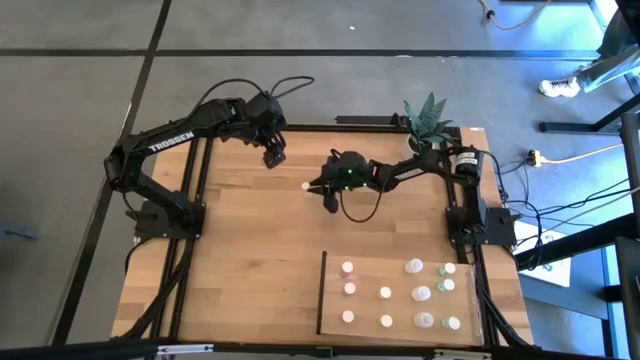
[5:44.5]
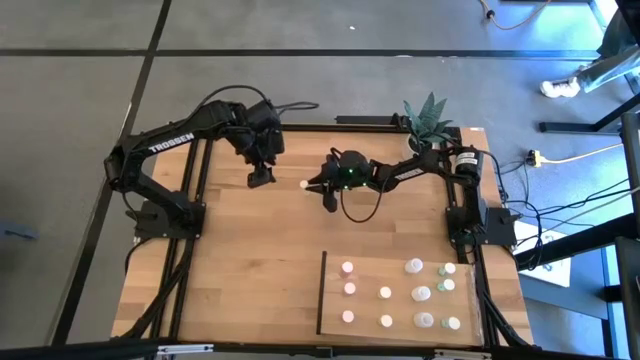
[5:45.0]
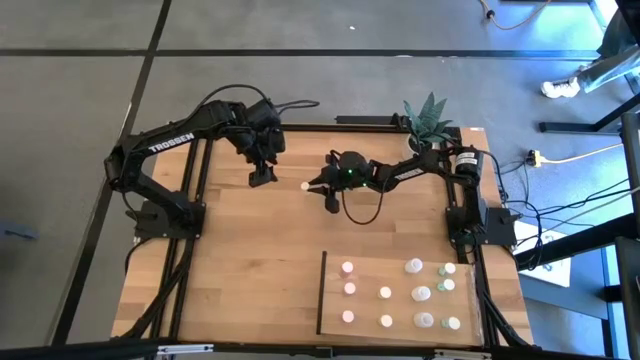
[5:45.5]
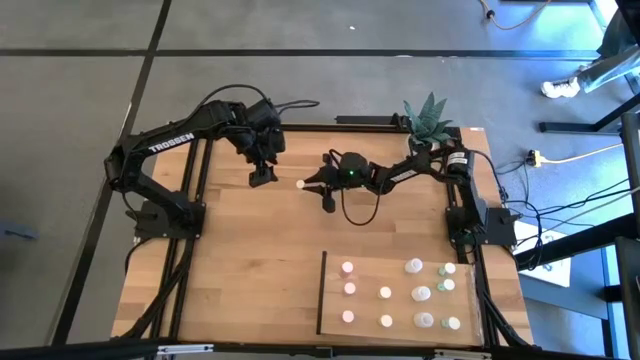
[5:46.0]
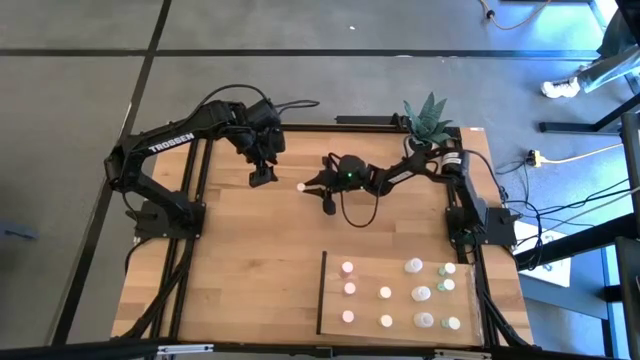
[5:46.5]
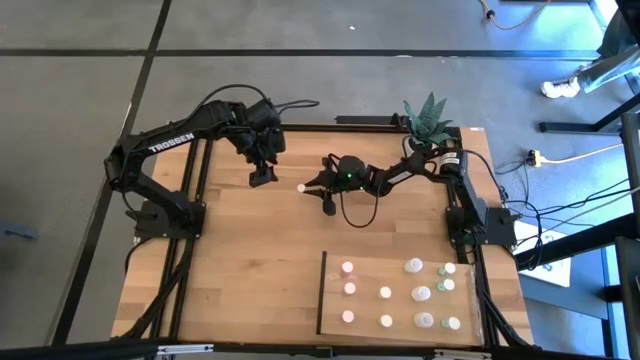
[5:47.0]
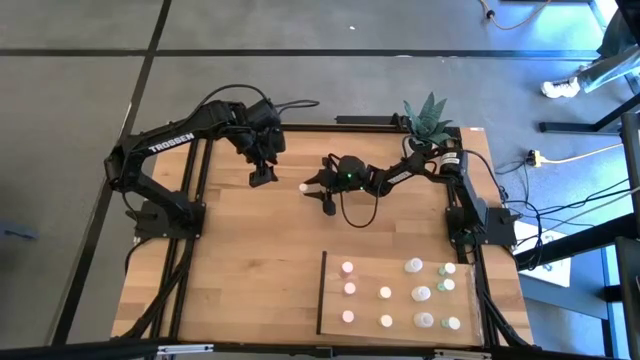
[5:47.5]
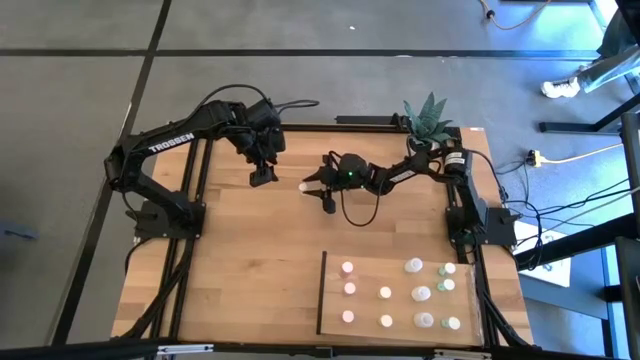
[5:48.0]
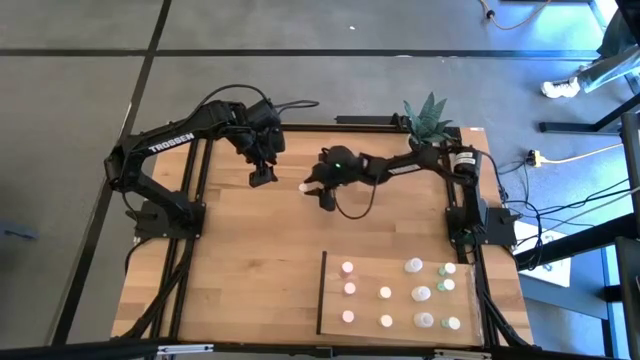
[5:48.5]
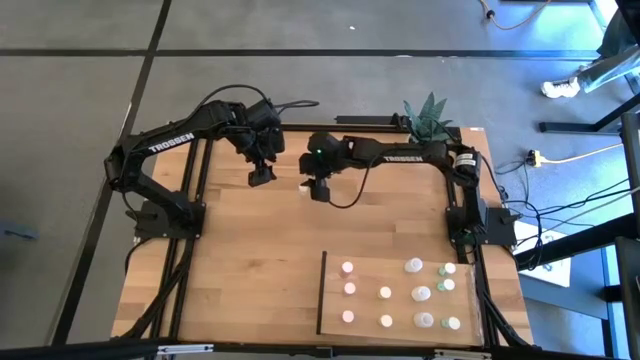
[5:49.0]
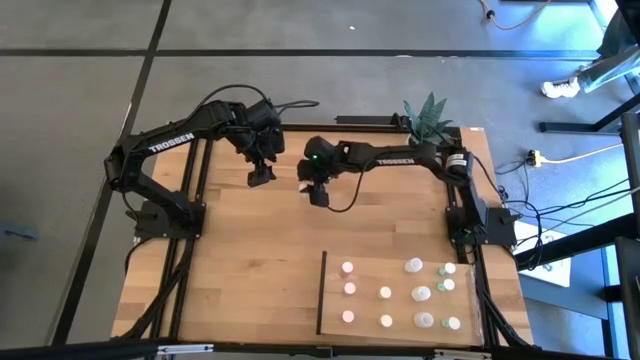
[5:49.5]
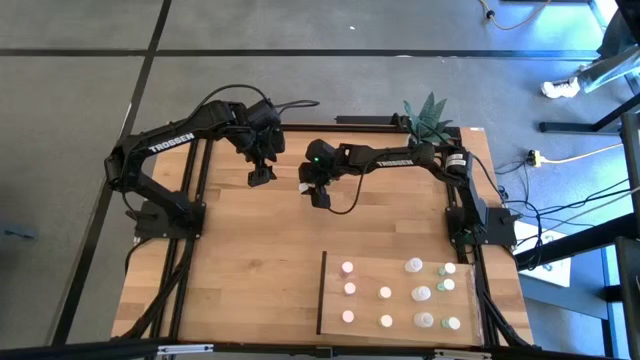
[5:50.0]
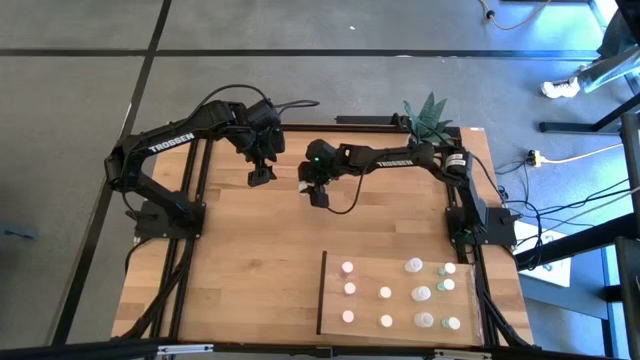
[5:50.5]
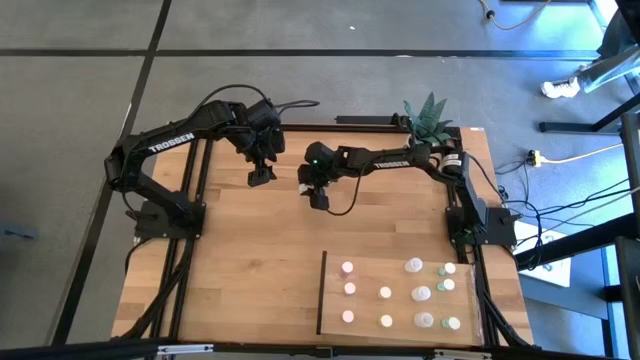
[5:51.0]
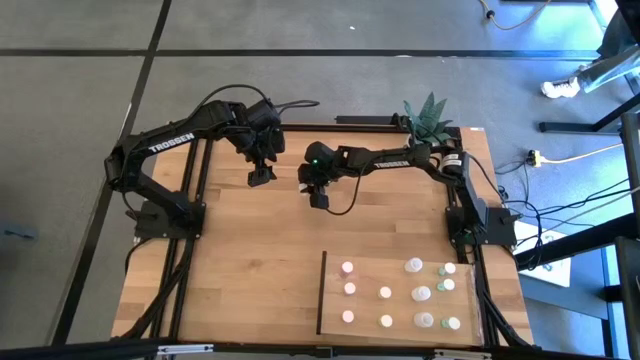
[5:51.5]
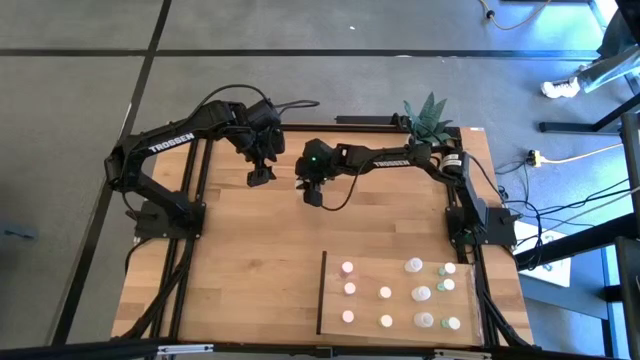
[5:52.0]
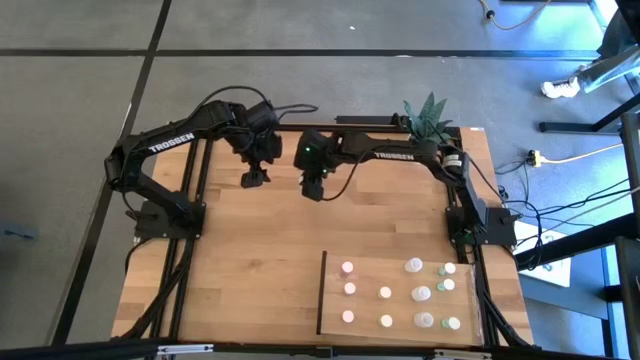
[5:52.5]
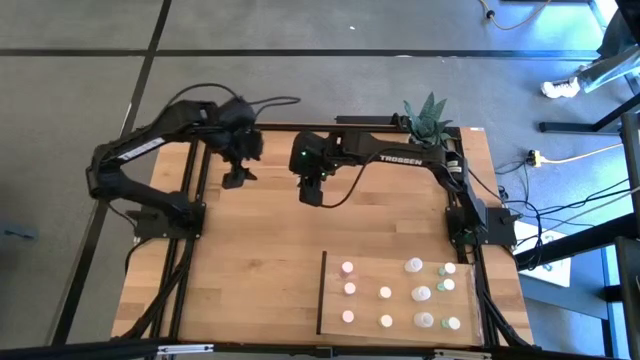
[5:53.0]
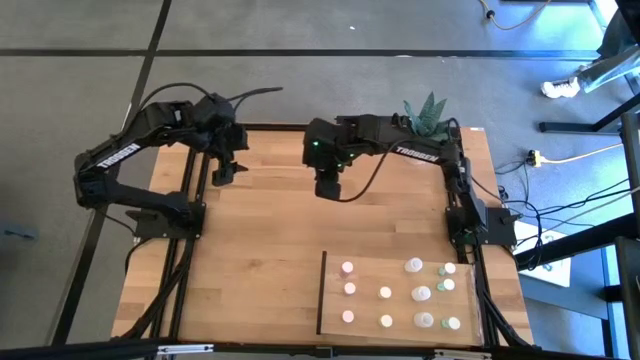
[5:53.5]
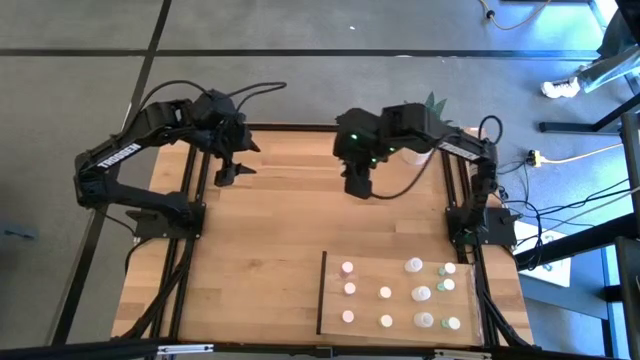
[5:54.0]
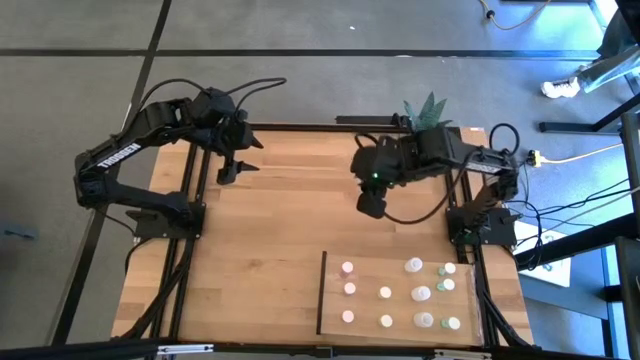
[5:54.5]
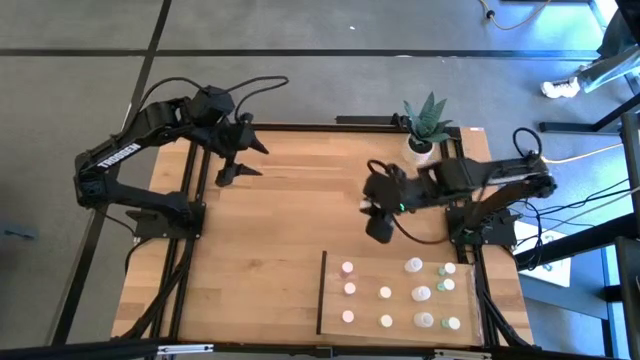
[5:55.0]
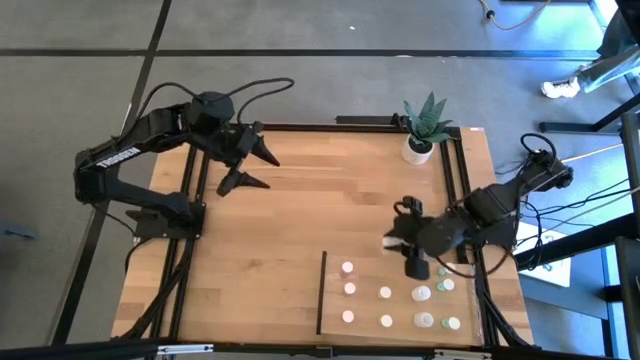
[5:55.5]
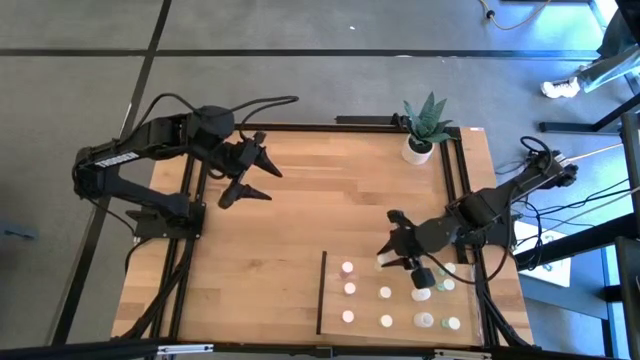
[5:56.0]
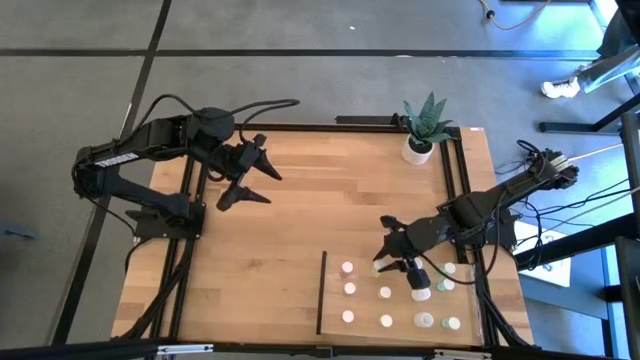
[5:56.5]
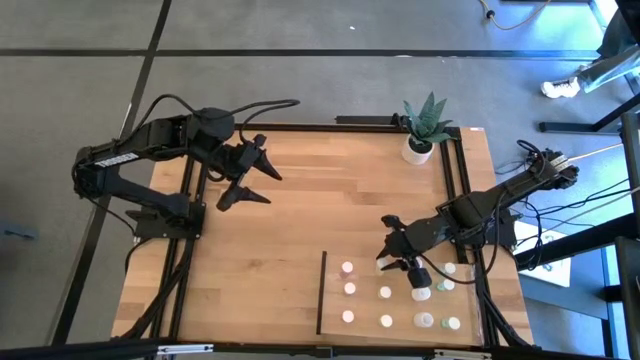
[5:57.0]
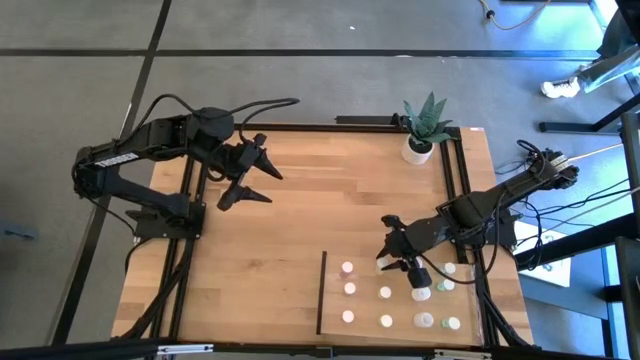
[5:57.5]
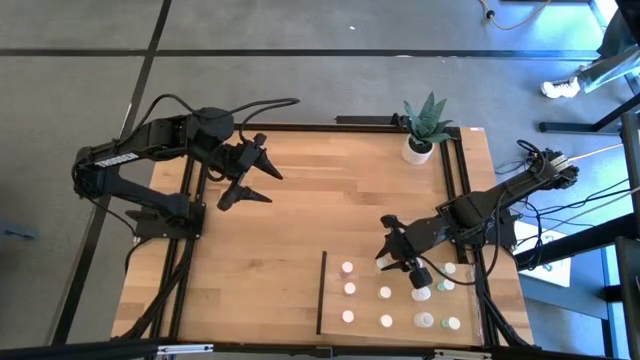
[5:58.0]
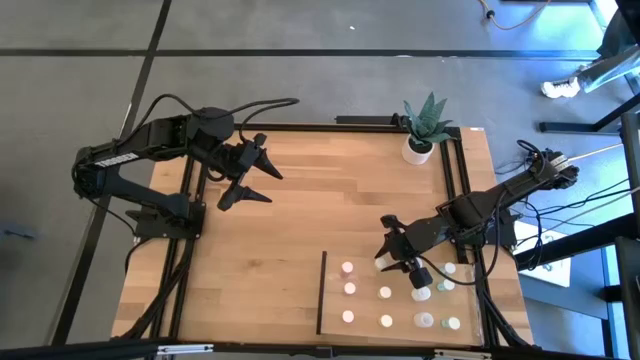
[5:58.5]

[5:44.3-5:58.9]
Task: Pick and place medicine bottles onto shelf by color
Put the yellow pill bottle on the shelf aligned with the other yellow pill bottle

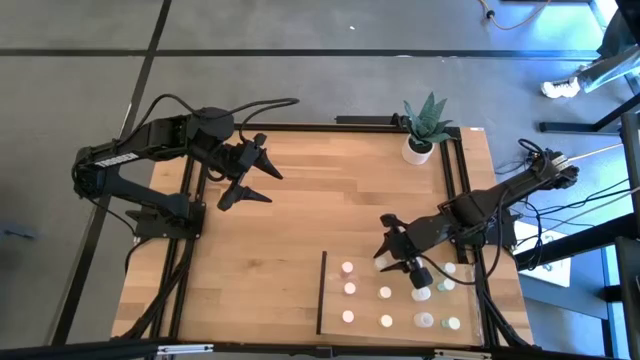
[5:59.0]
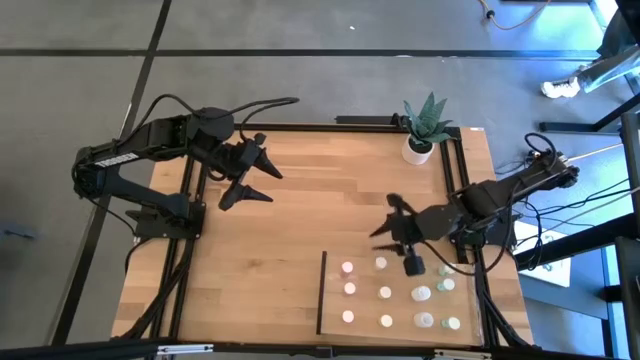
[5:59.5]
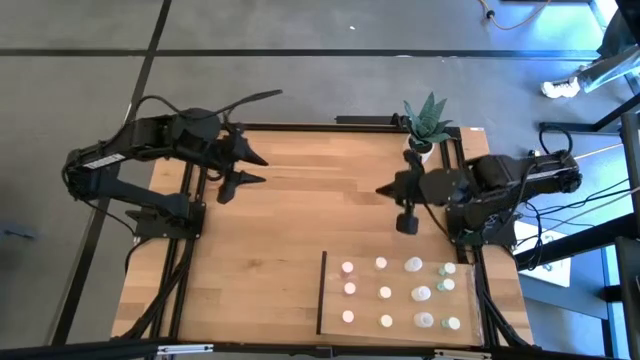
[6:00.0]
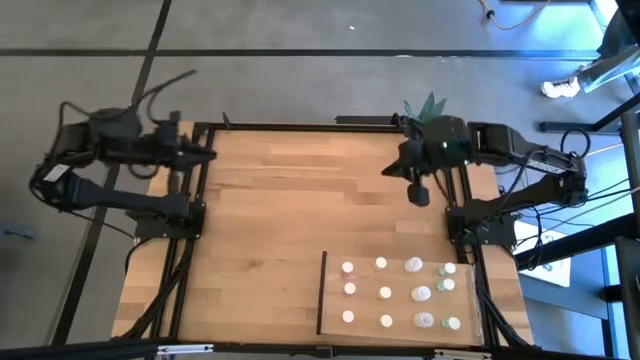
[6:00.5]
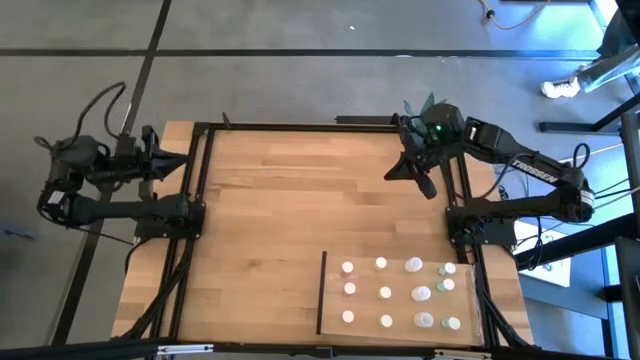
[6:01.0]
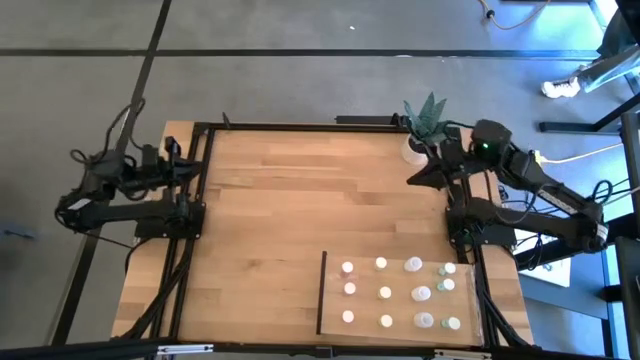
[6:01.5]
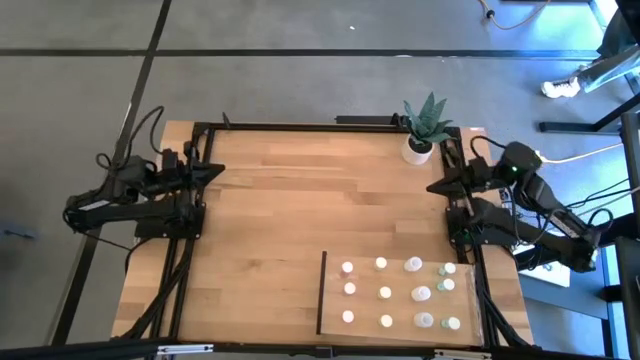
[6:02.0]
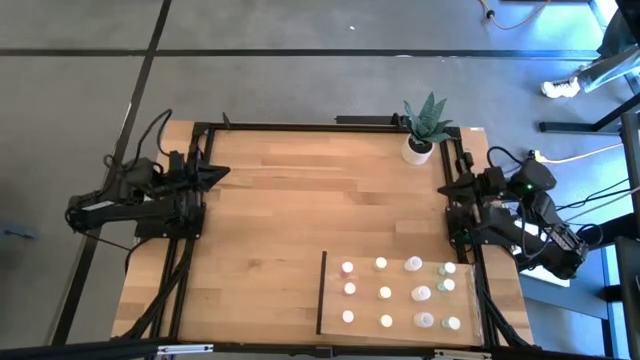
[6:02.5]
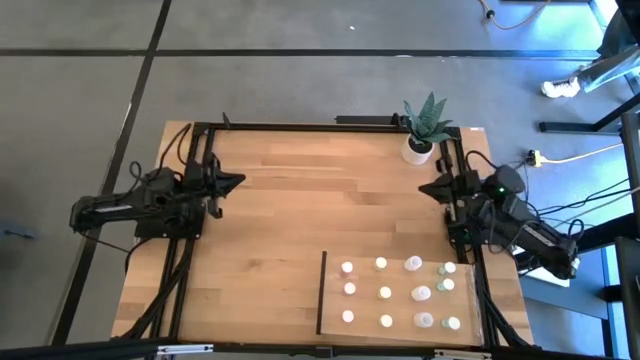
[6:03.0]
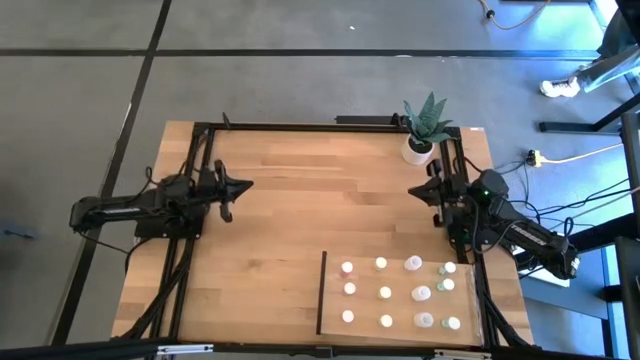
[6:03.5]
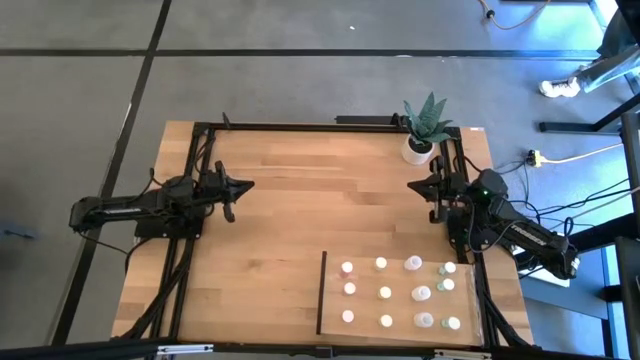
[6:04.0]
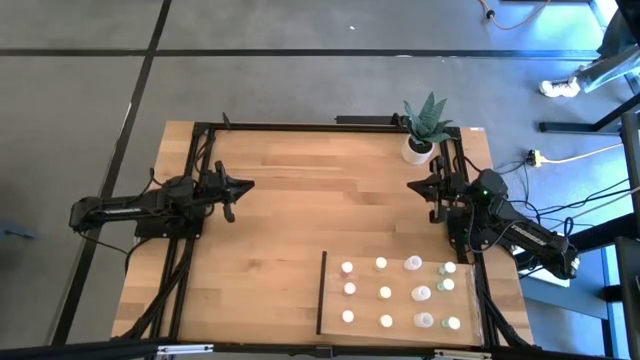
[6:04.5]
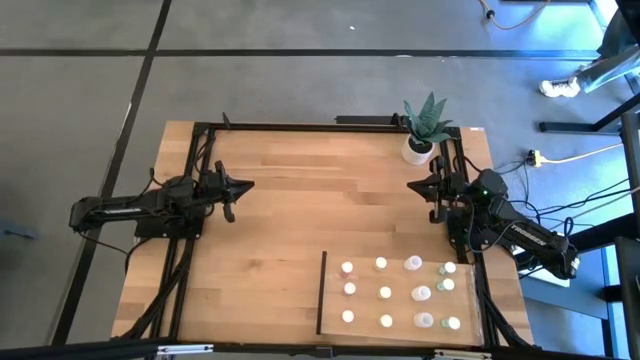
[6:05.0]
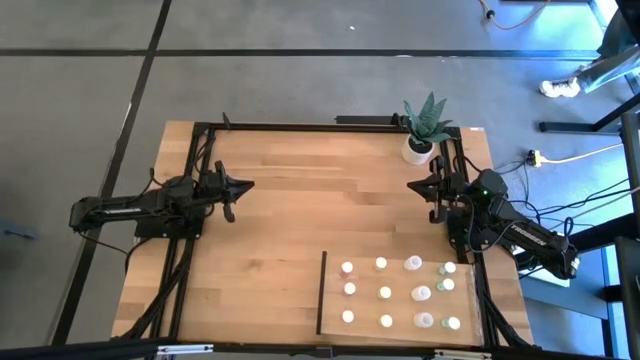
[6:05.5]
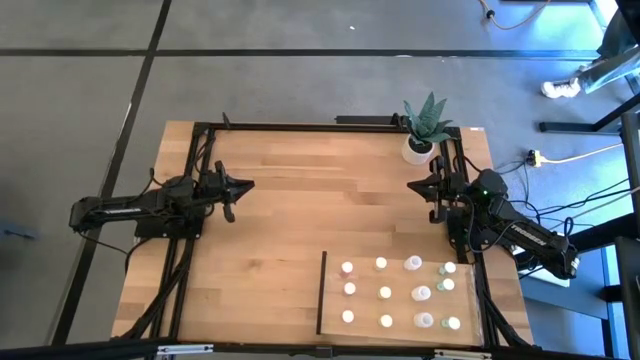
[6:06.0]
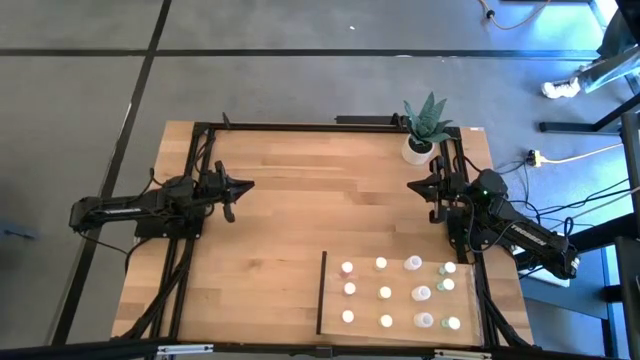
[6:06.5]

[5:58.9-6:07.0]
Return to Home Position
